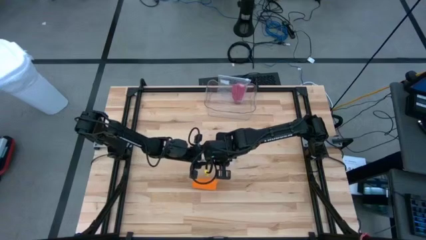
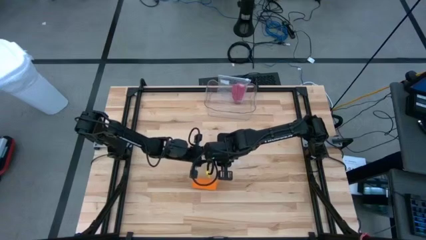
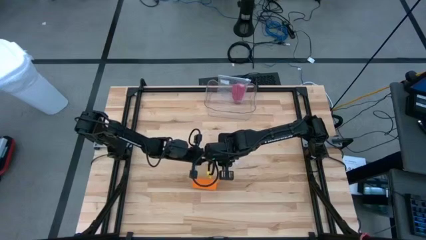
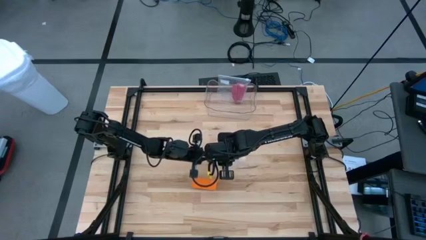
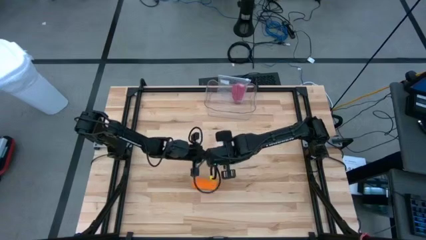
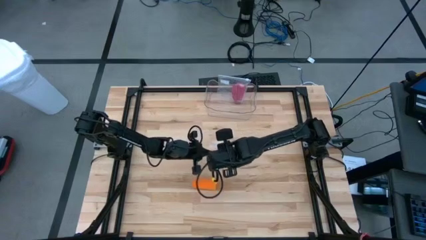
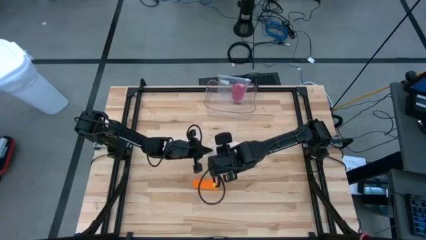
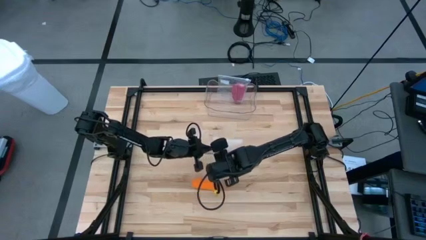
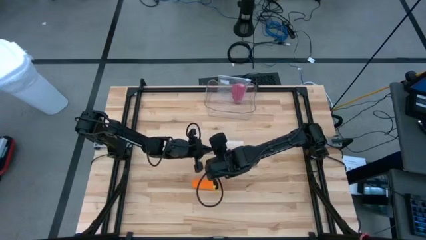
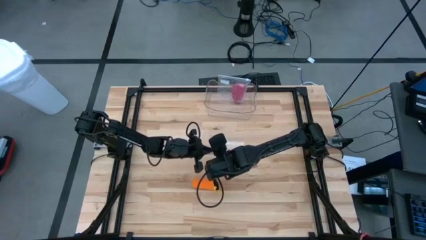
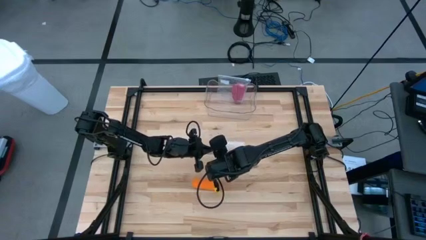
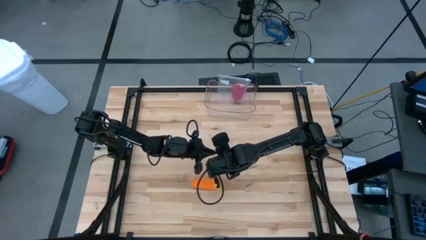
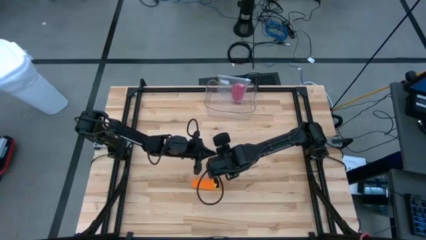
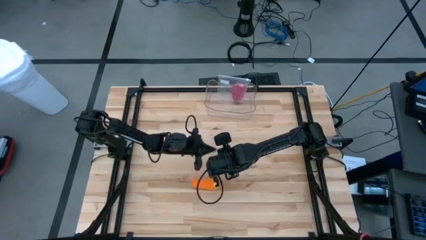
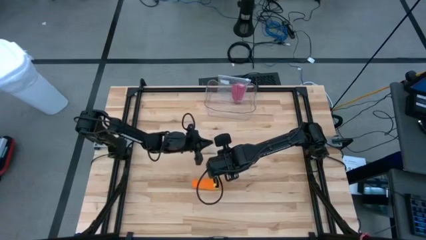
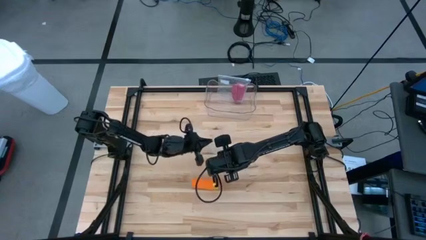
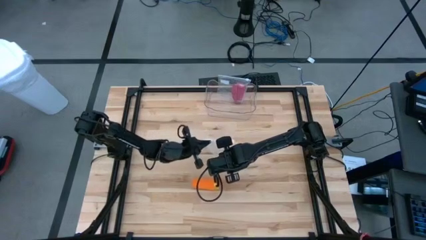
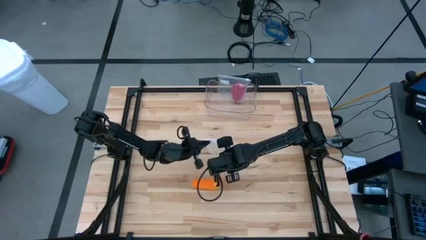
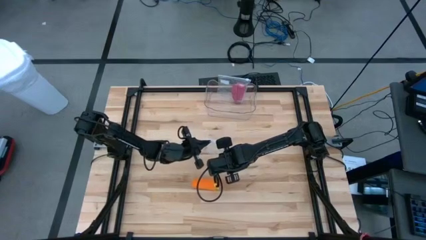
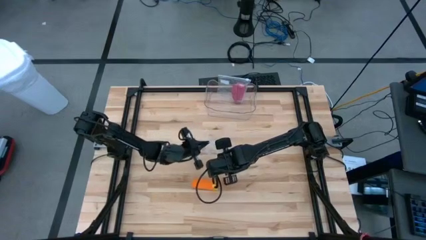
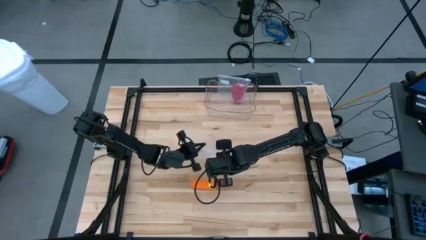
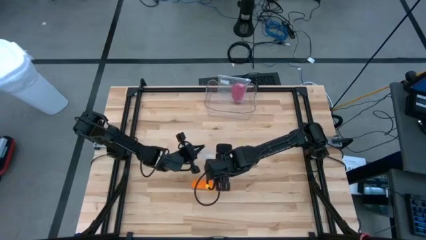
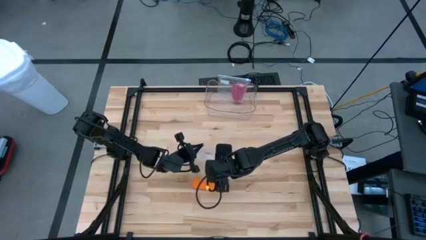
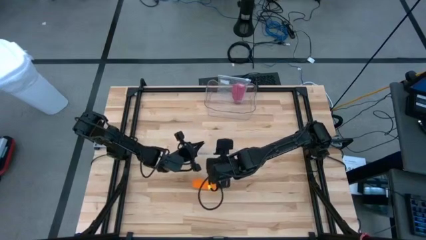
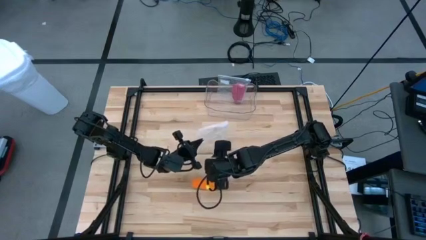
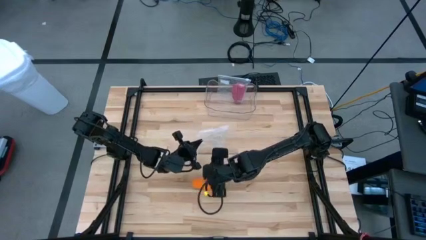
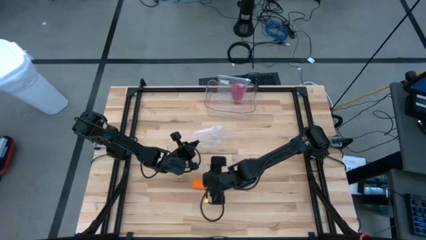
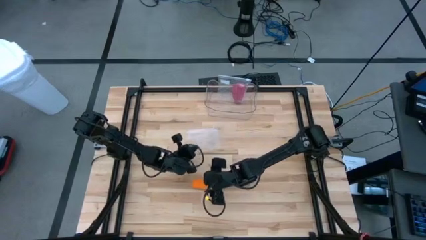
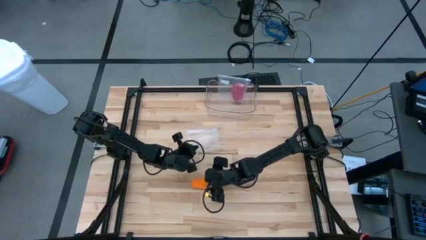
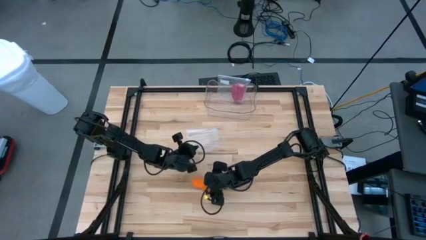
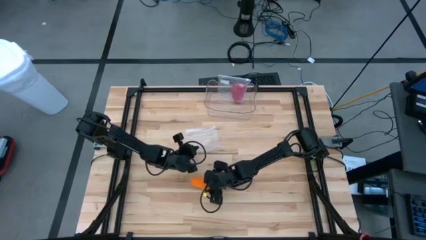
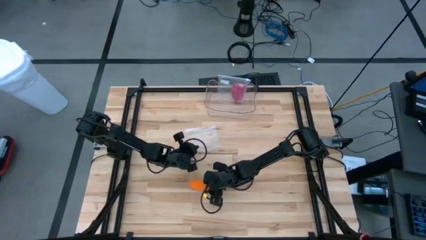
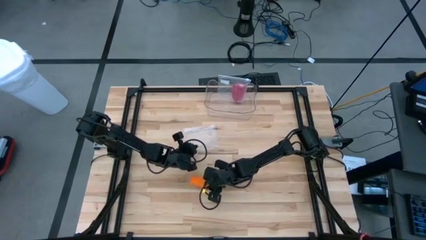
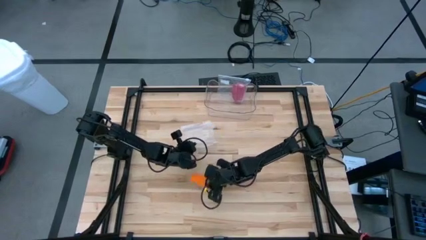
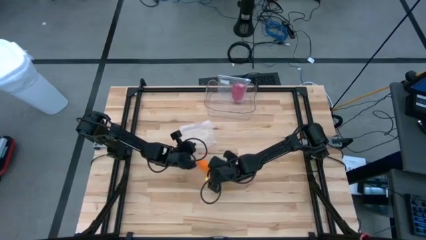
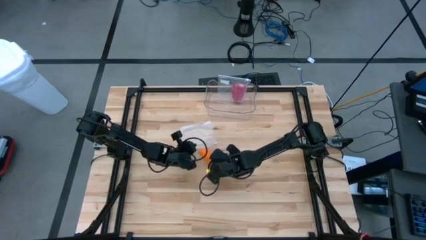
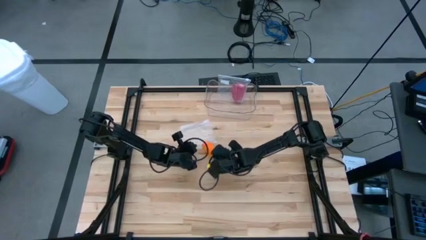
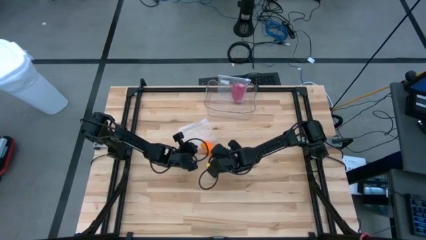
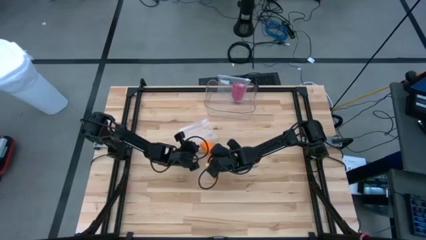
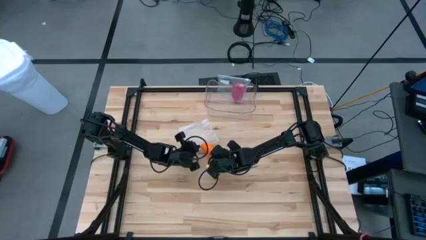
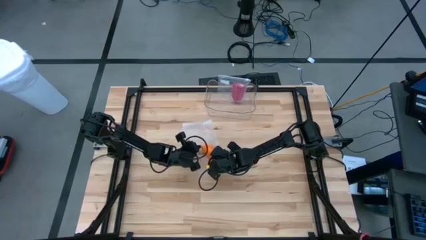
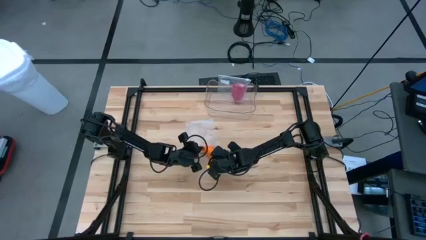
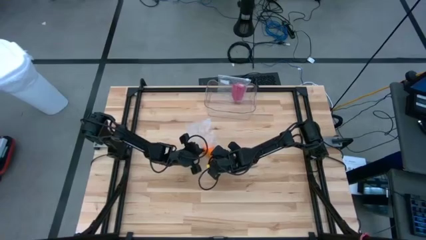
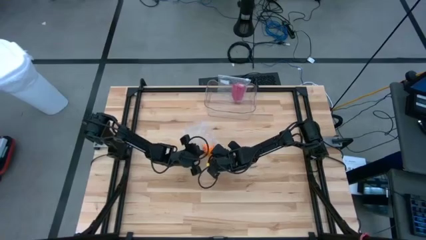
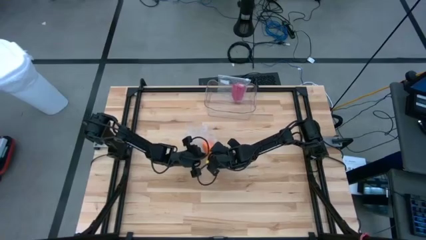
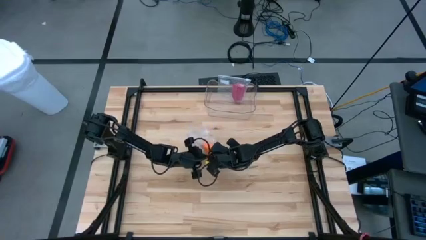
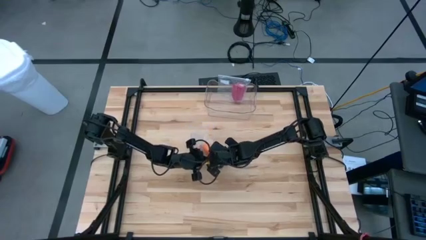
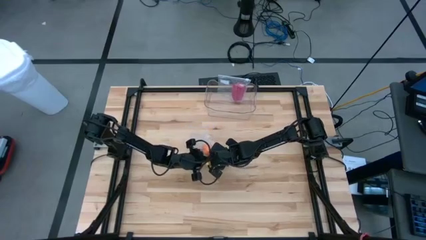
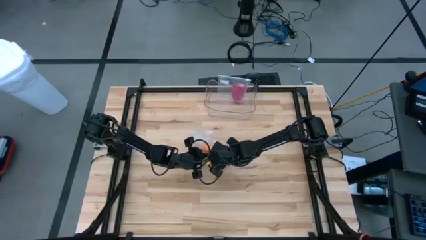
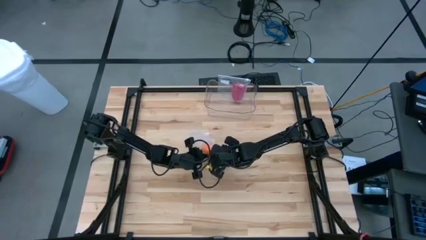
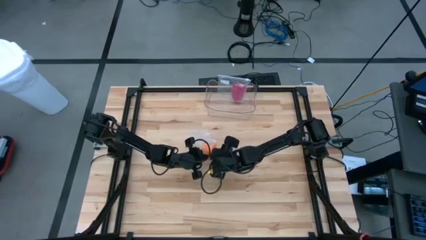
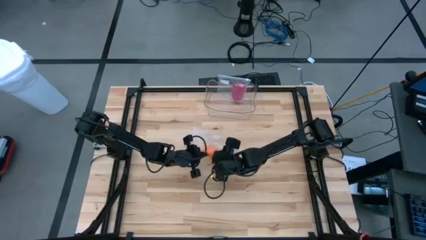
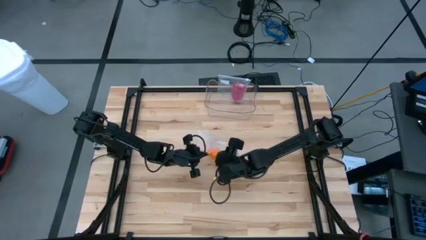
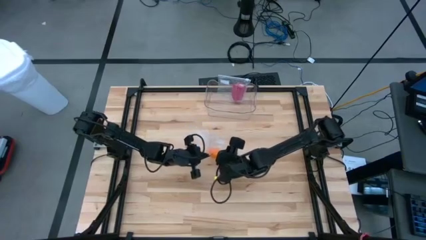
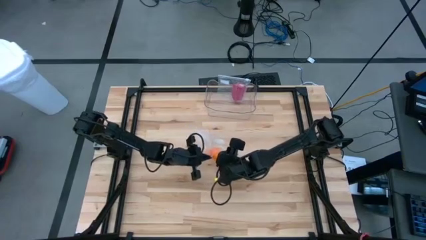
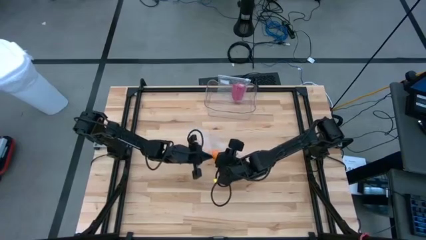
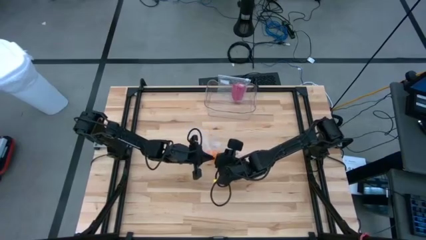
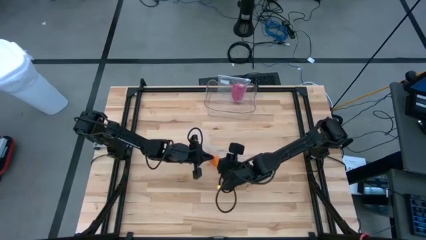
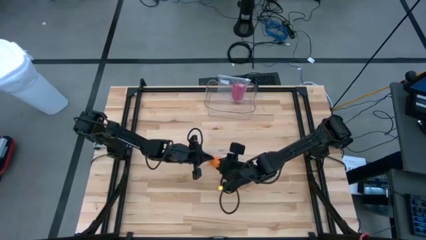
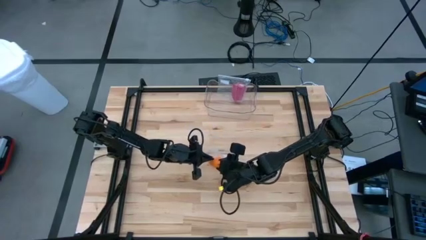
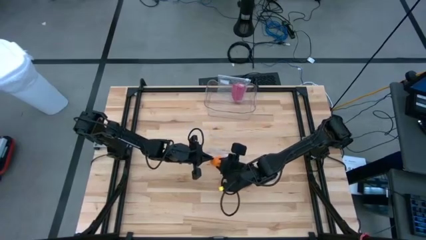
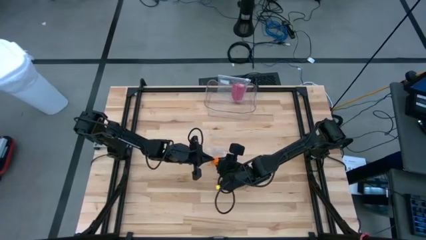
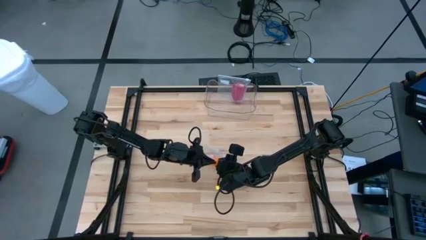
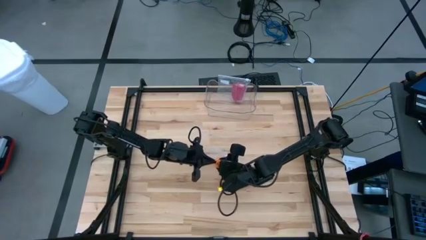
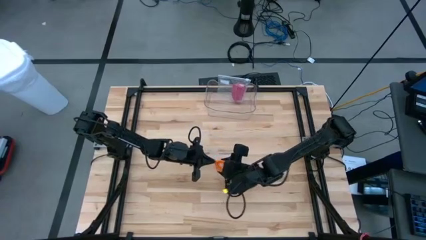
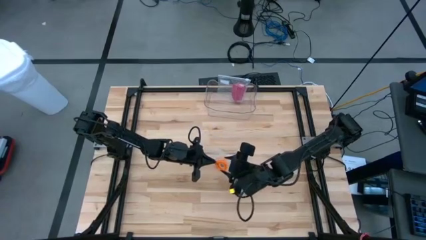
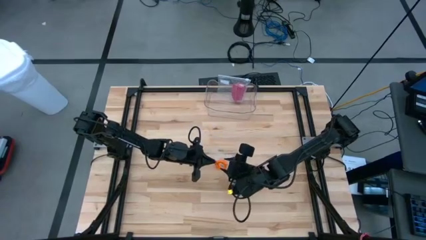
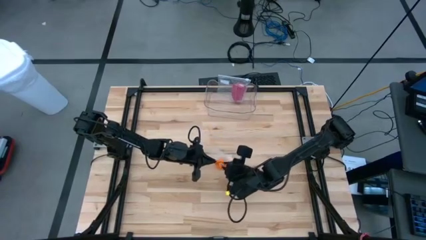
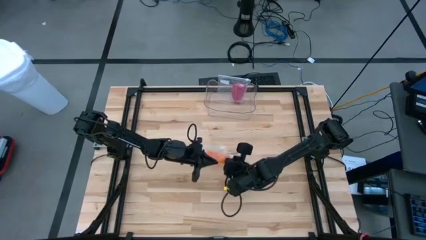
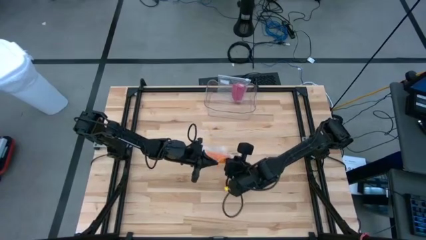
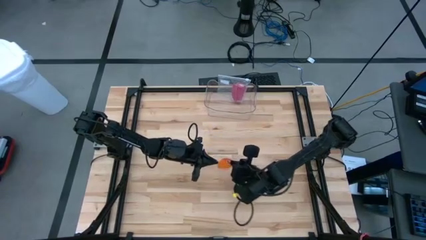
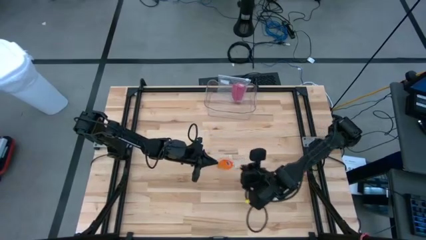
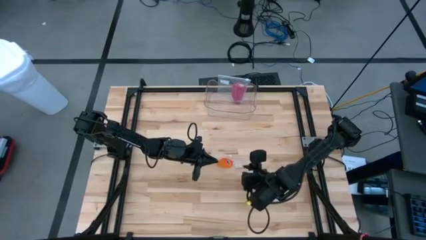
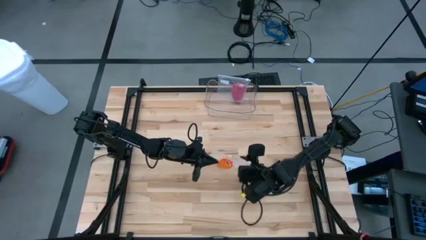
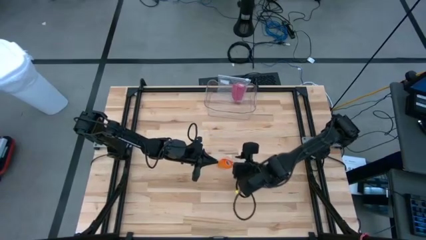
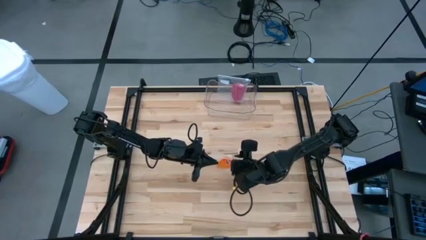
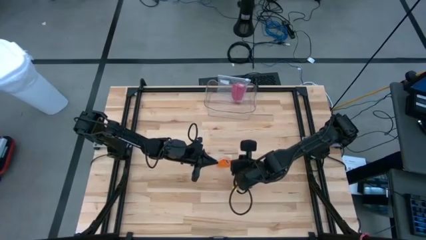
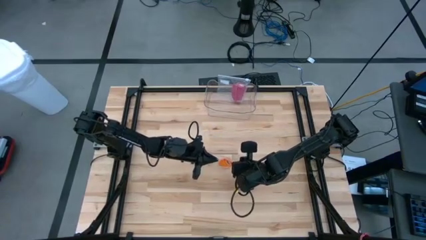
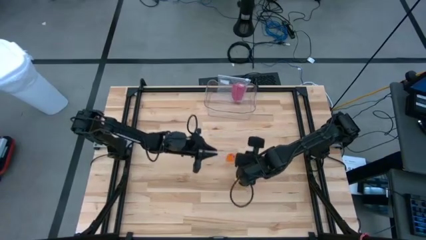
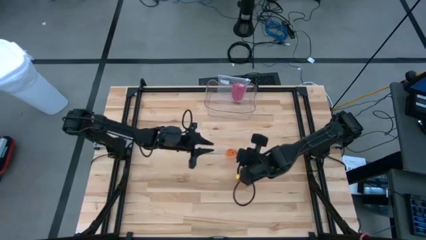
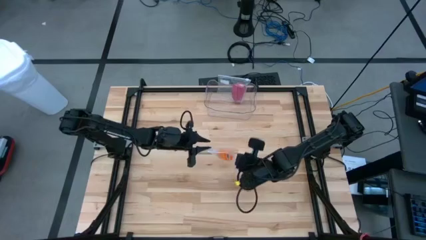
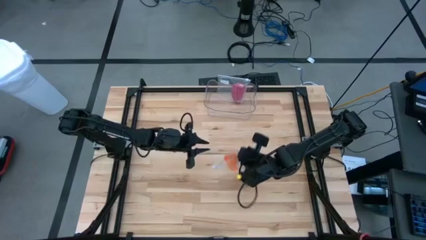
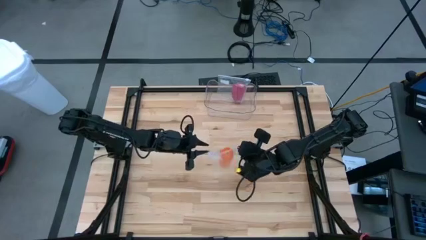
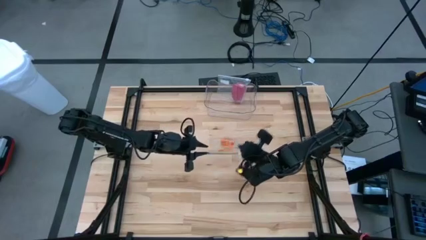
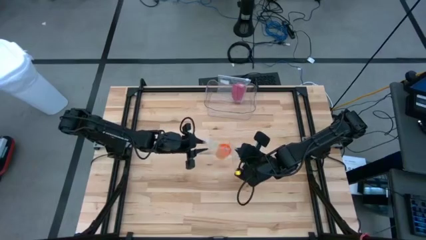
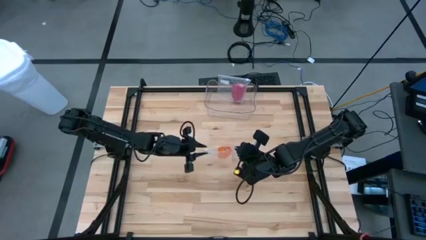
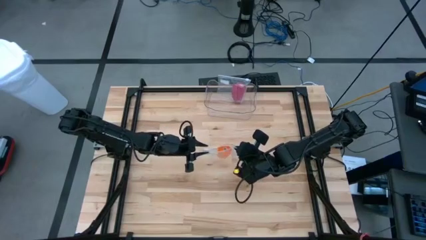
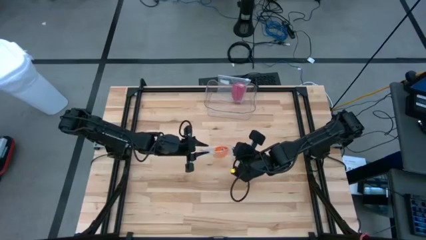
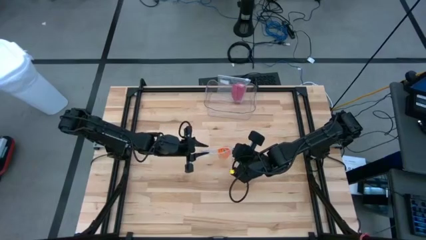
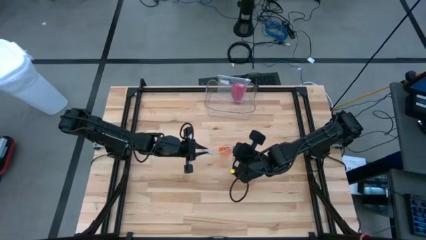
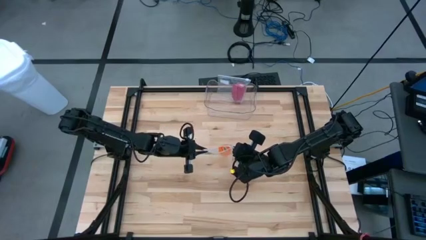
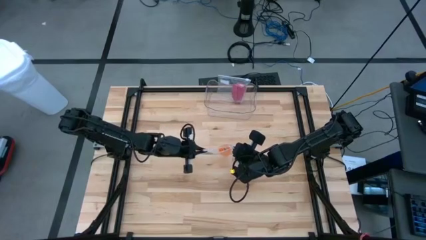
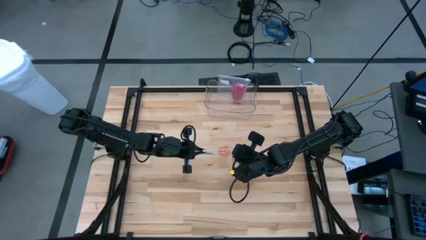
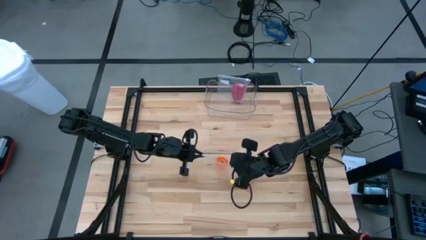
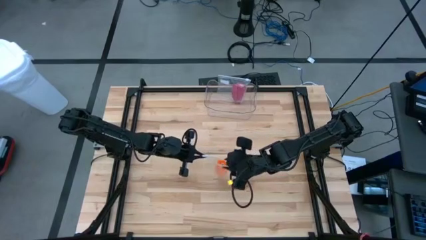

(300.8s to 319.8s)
Task: Roll bandage
Put the orange bandage into the zip bag
